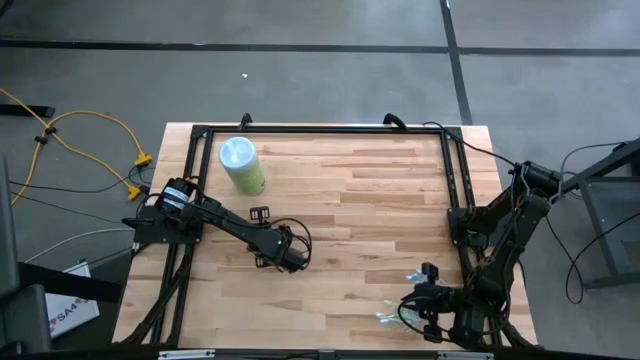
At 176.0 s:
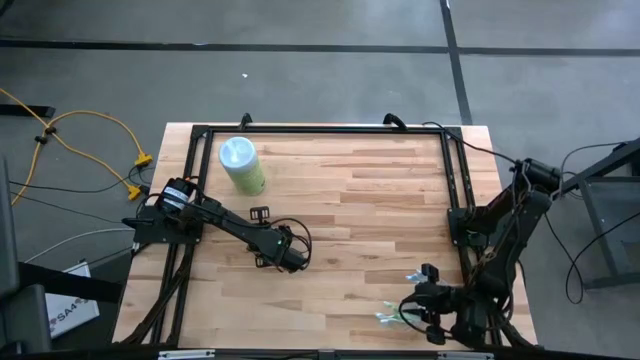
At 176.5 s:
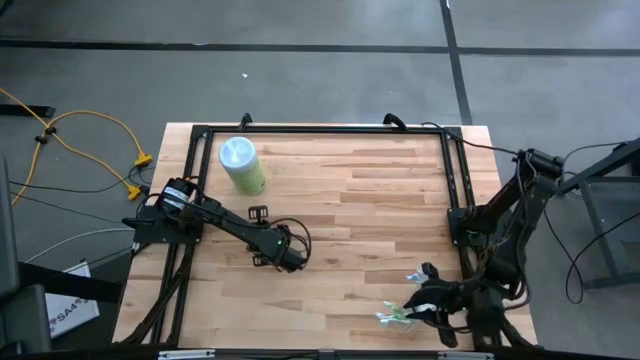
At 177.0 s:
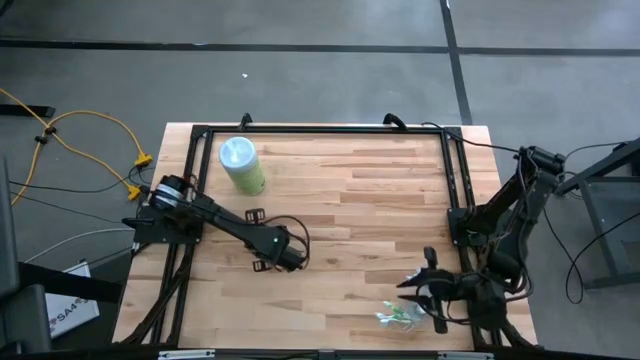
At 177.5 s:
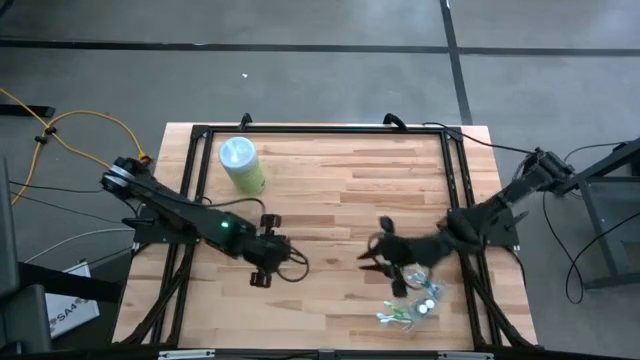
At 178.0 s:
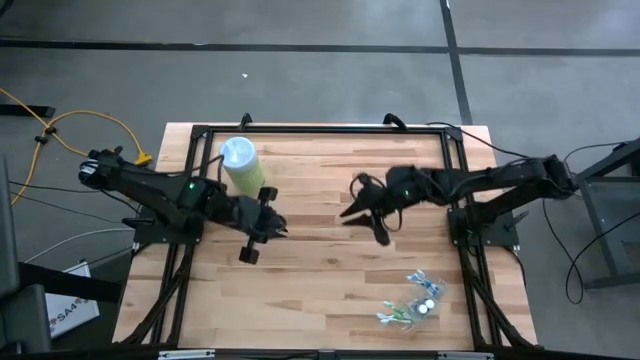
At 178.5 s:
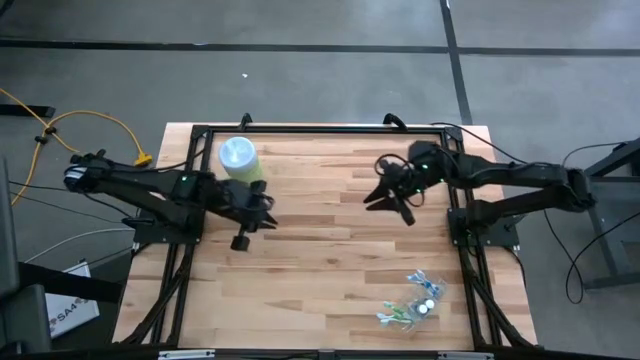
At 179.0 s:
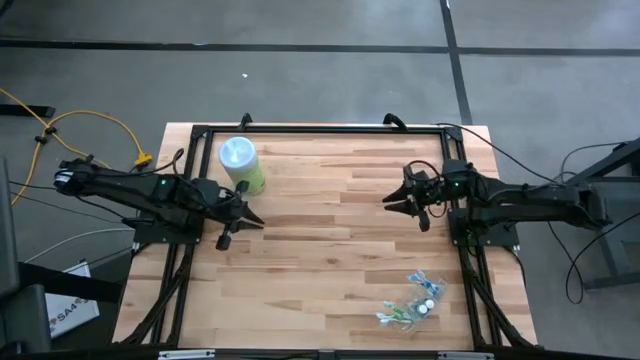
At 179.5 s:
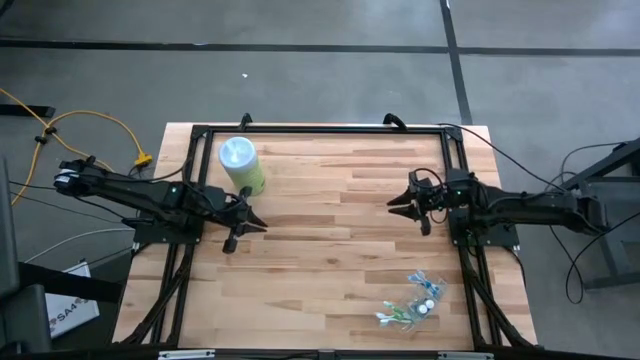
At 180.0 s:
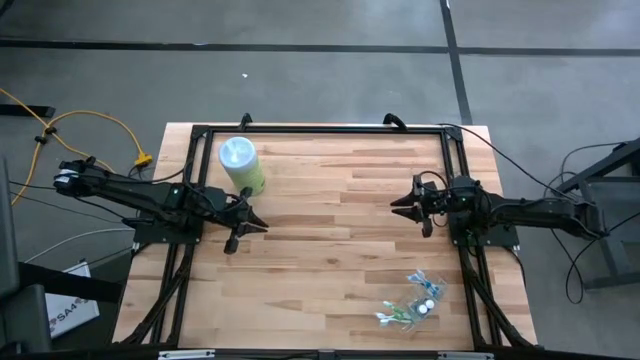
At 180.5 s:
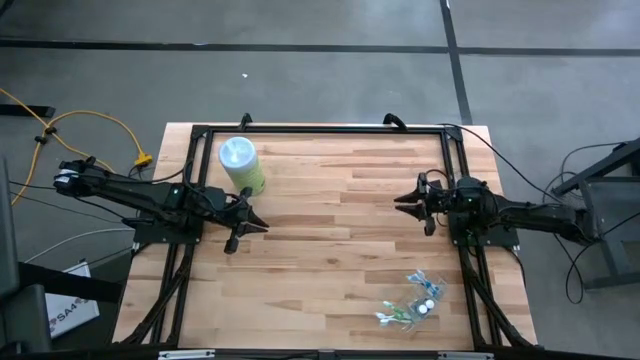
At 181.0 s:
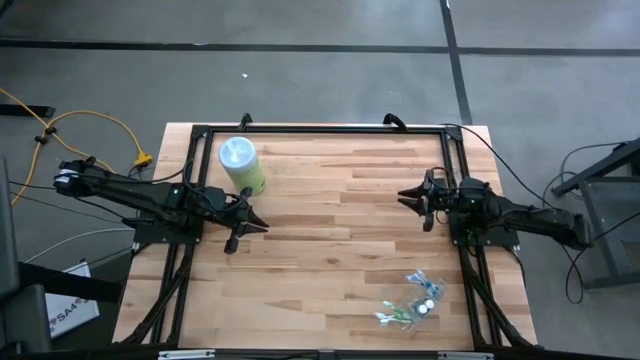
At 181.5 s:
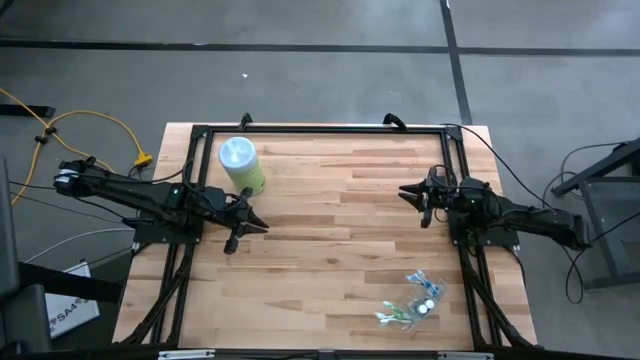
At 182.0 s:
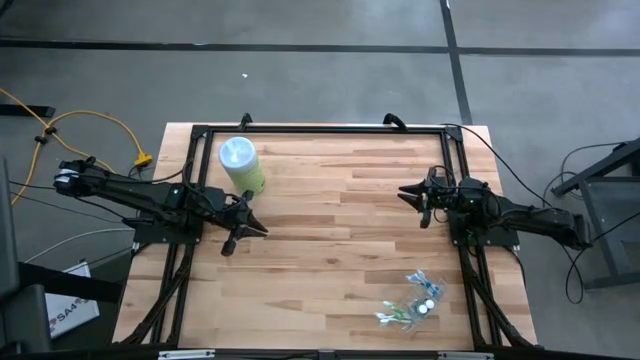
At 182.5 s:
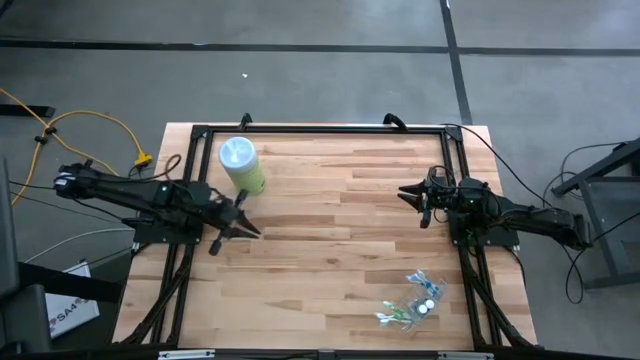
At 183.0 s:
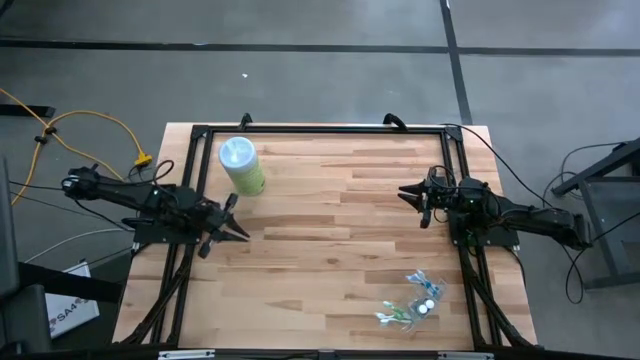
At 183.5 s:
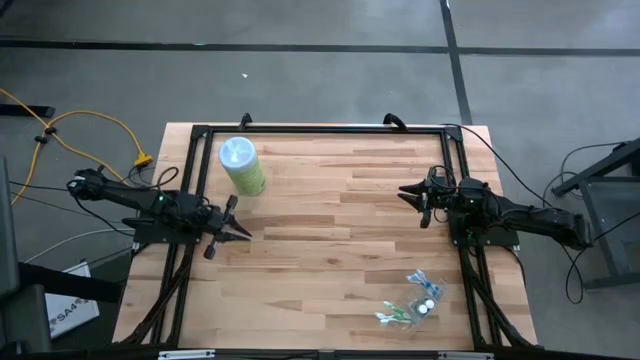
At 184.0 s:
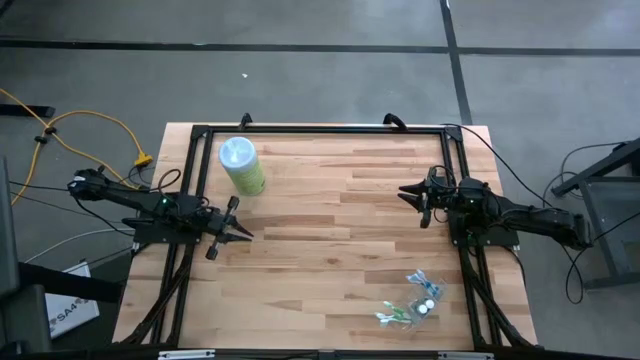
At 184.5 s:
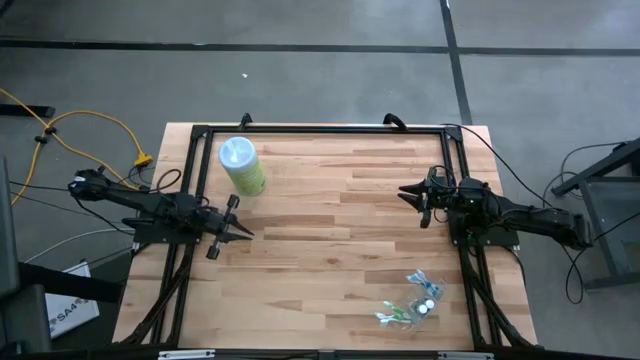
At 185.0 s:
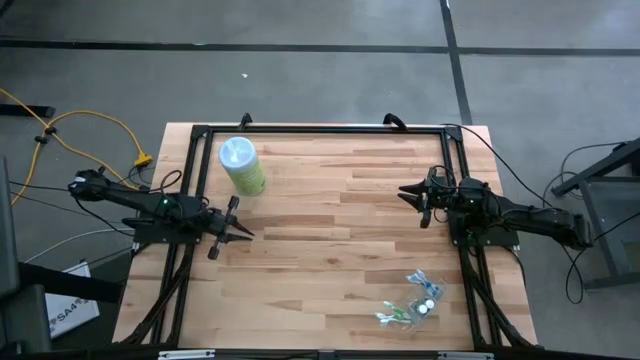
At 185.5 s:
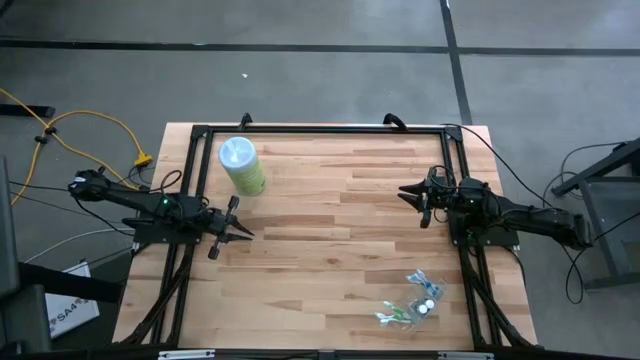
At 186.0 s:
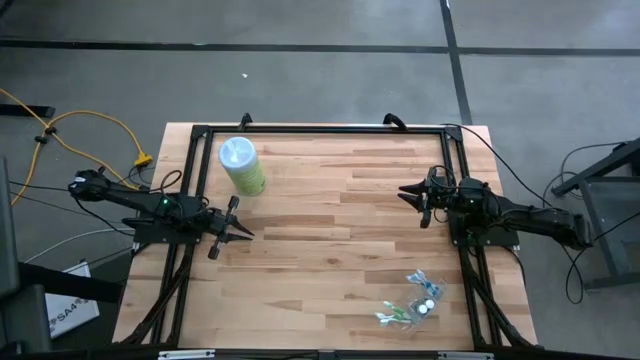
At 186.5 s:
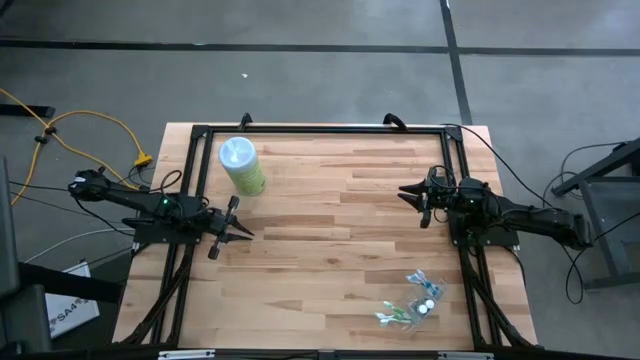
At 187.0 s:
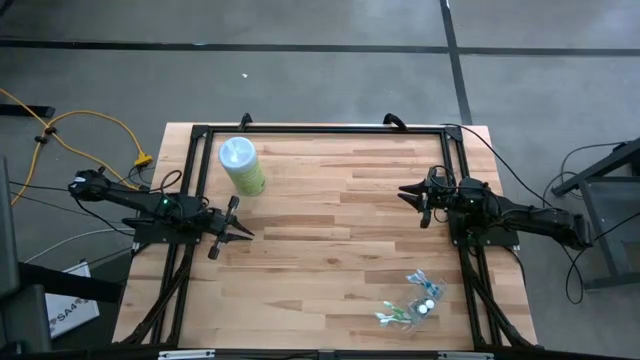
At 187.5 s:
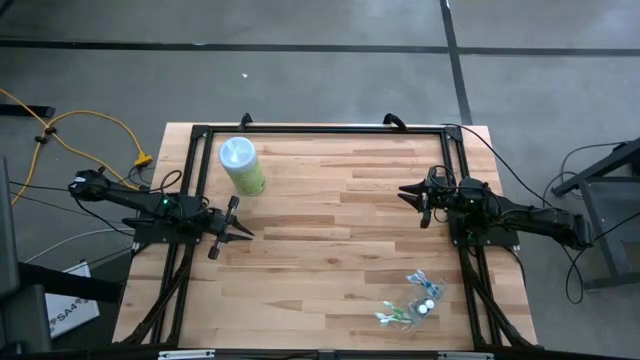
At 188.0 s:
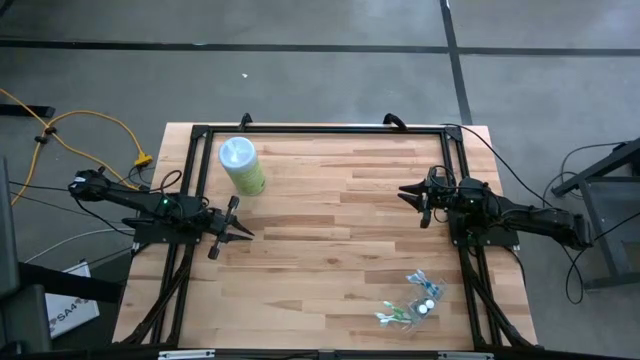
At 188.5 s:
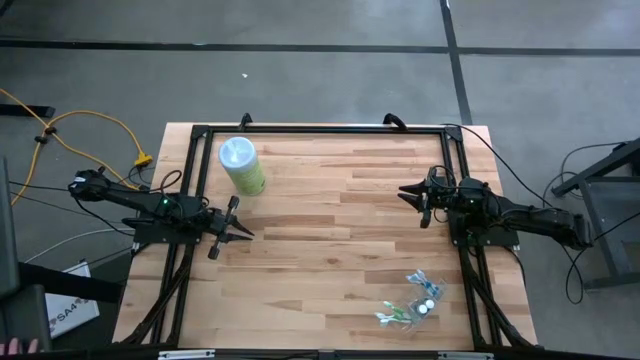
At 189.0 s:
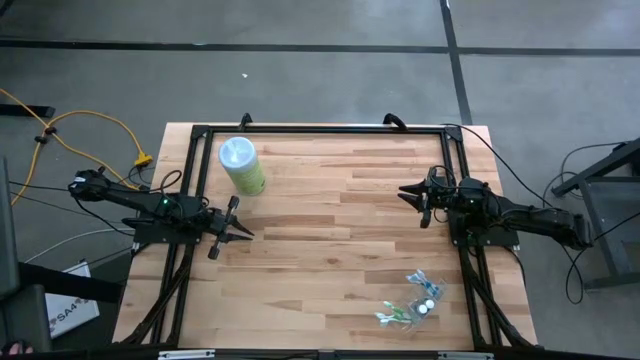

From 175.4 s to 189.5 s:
Task: Pick & Place toothbrushing station
Return to Home Position

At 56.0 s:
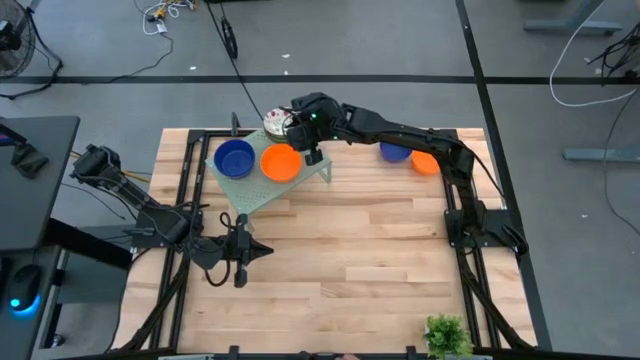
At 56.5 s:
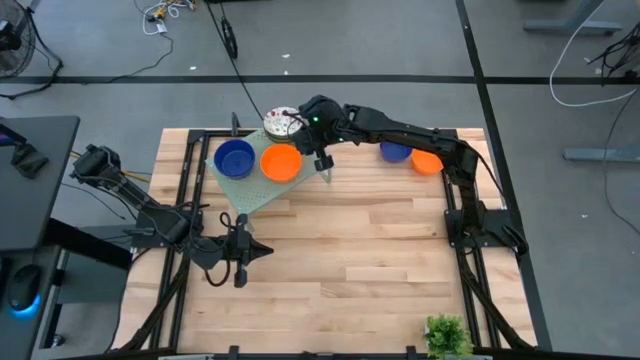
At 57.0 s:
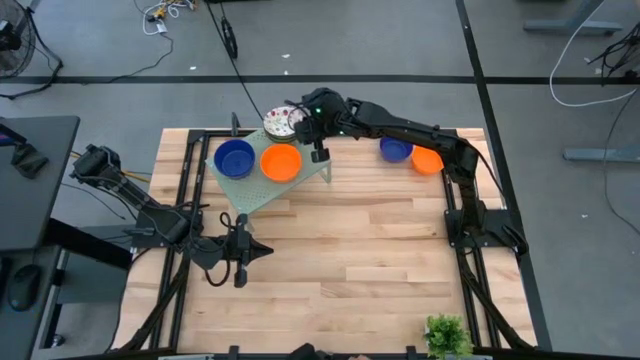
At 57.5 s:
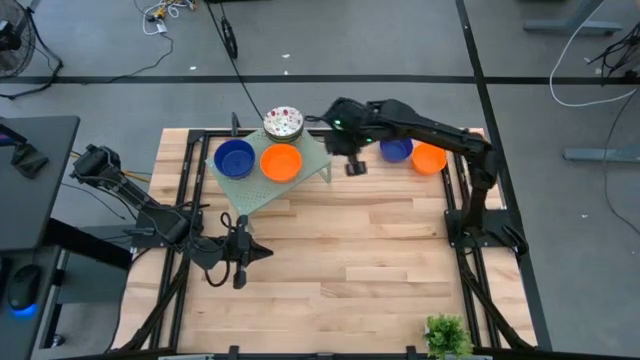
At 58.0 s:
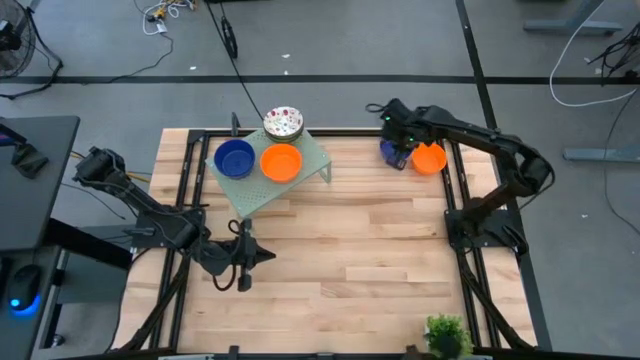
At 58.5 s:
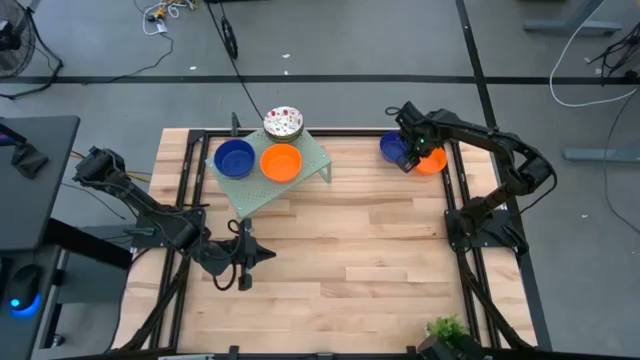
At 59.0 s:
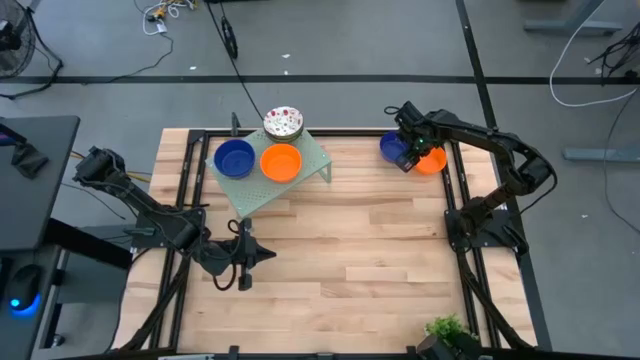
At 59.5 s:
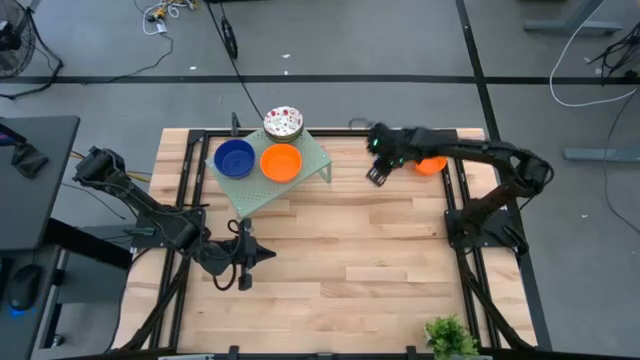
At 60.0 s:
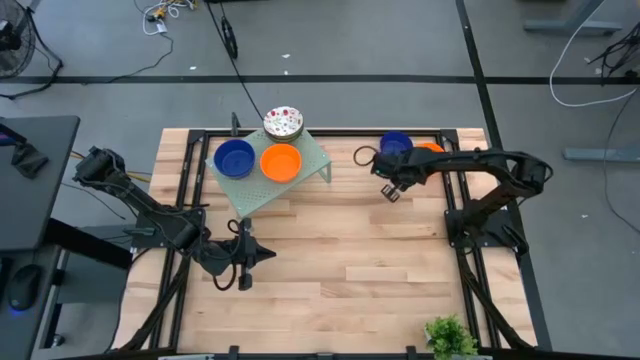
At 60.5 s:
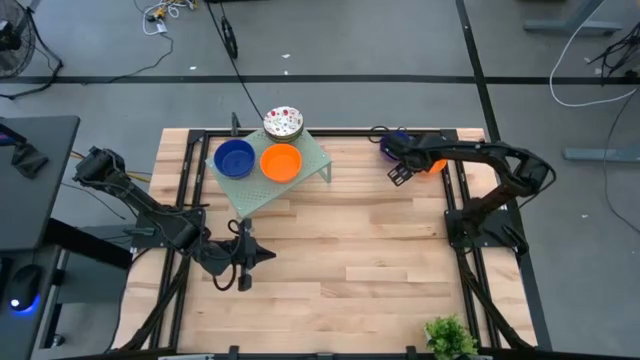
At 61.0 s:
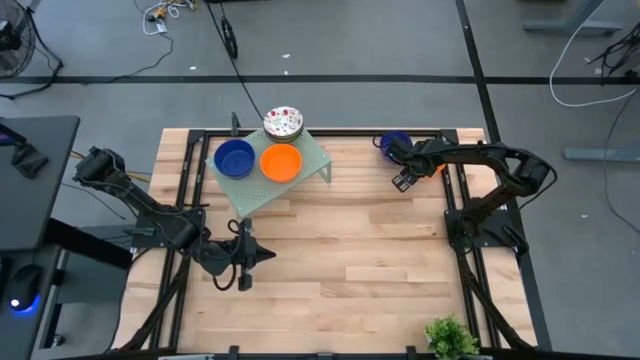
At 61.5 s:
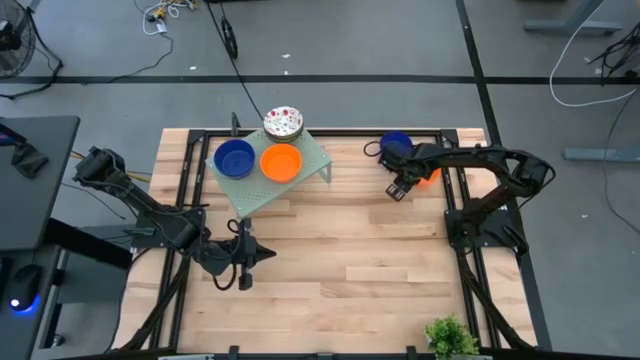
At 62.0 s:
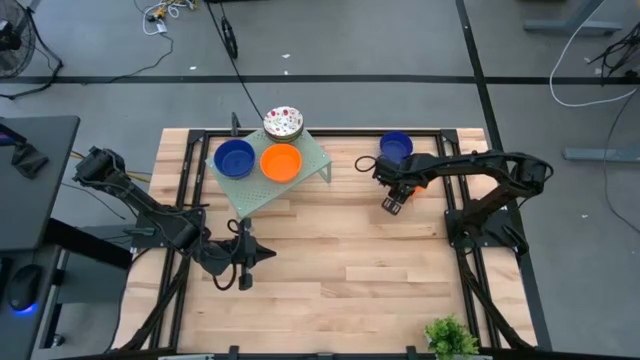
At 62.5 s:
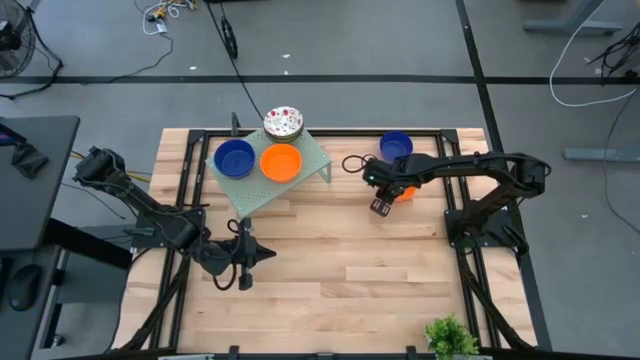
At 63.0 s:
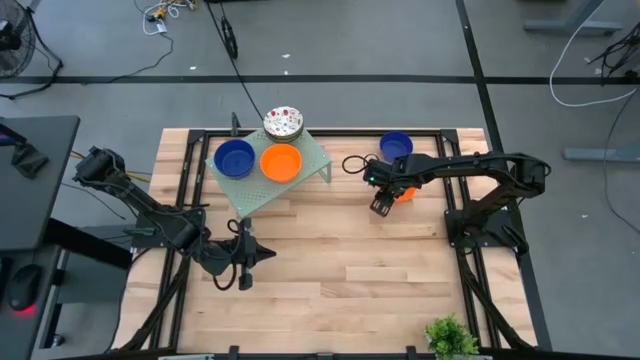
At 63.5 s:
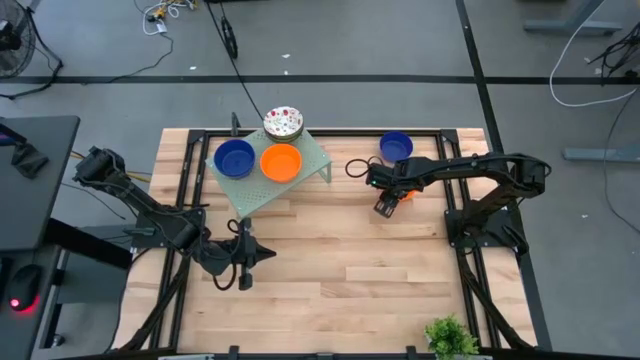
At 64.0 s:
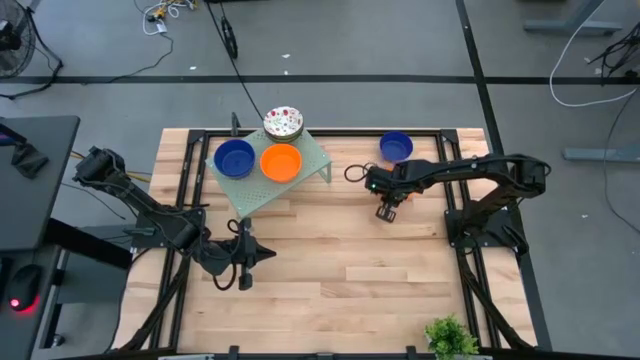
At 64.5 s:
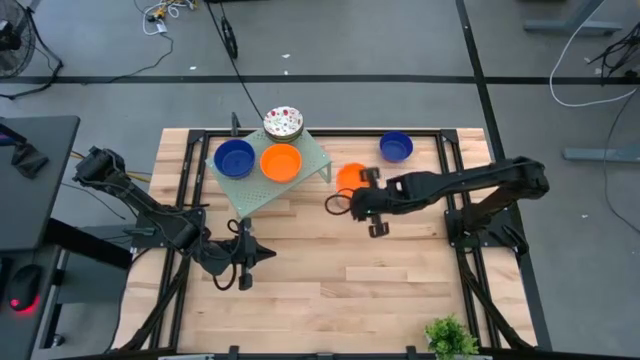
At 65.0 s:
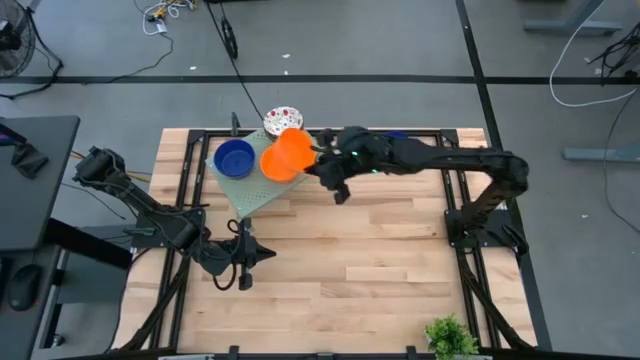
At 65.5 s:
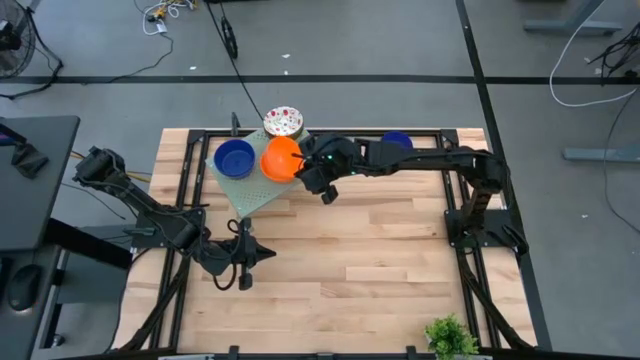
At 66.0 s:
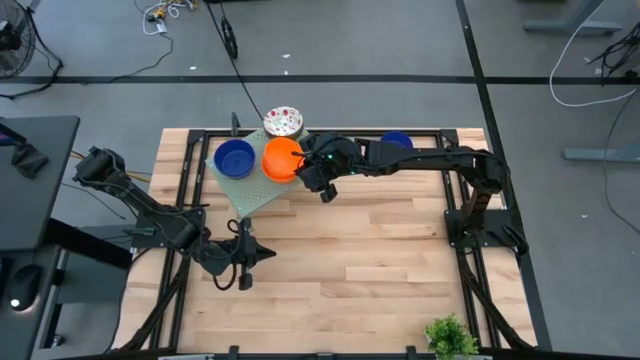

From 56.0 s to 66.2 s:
Task: Pick & Place Mini bowls
Stack the orange bowl on the orange bowls on the shelf
